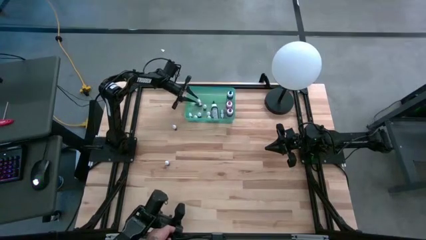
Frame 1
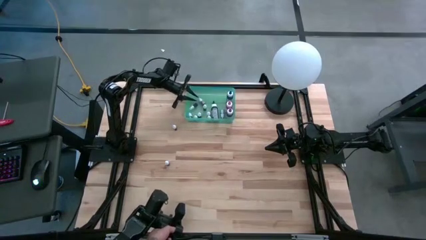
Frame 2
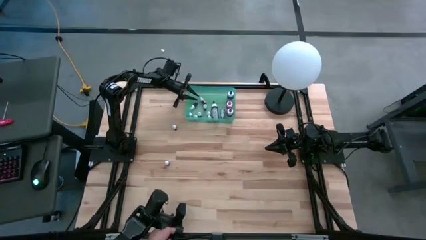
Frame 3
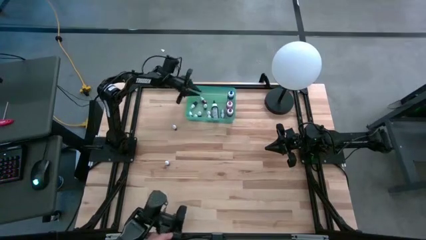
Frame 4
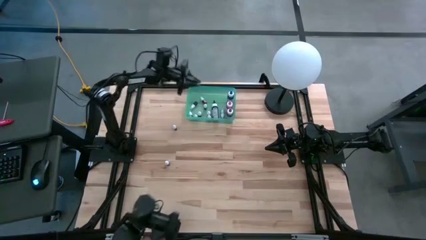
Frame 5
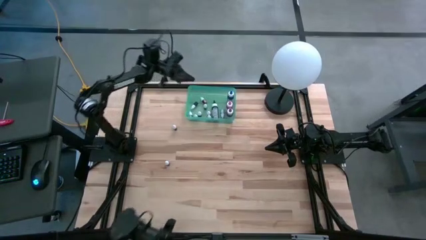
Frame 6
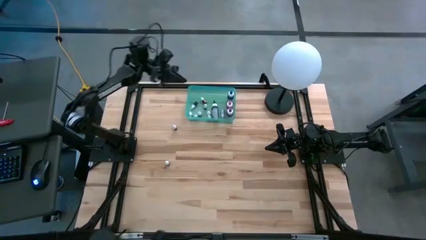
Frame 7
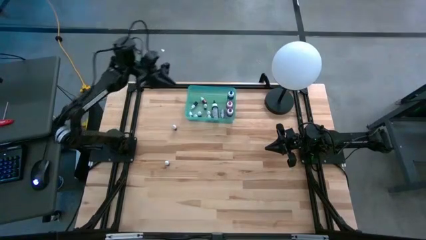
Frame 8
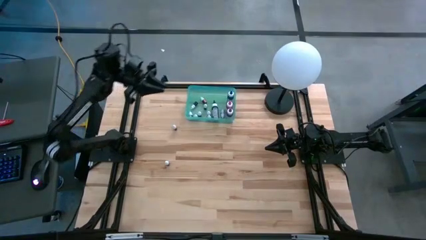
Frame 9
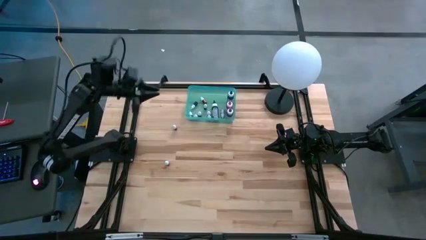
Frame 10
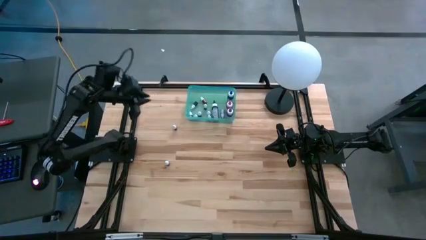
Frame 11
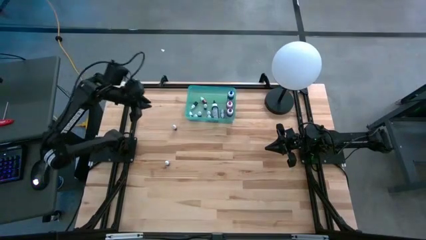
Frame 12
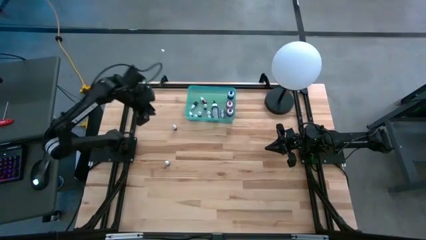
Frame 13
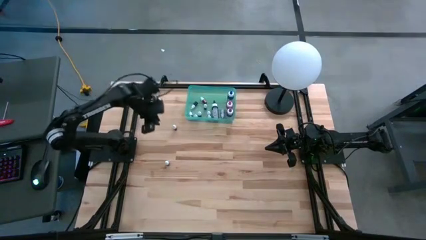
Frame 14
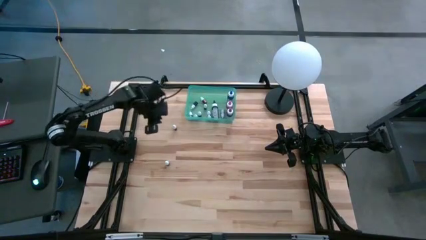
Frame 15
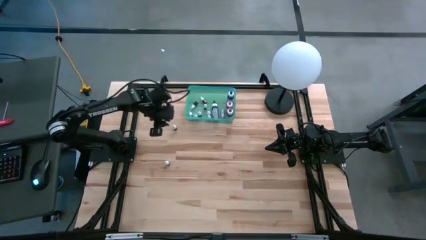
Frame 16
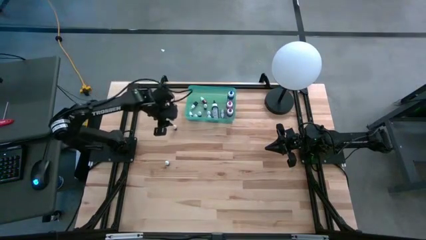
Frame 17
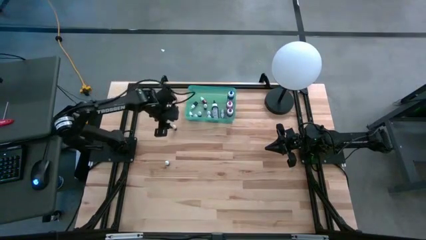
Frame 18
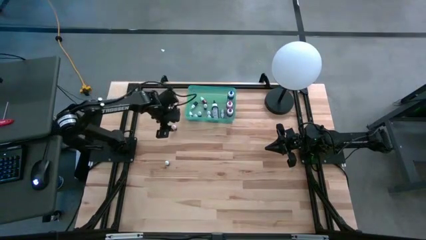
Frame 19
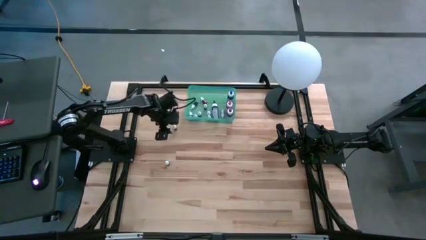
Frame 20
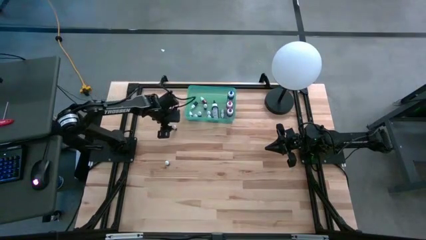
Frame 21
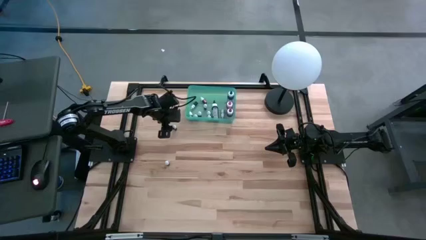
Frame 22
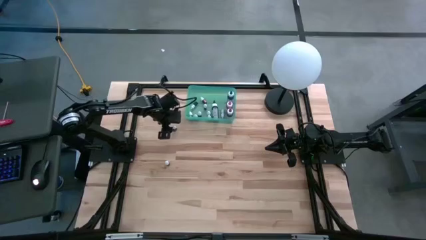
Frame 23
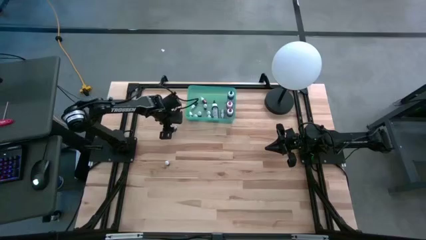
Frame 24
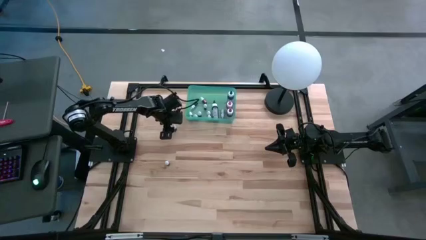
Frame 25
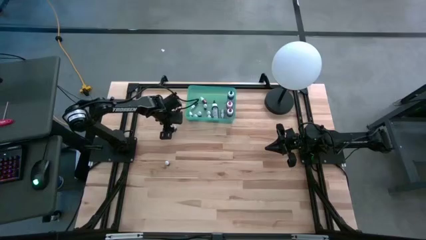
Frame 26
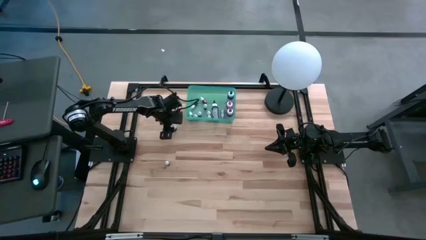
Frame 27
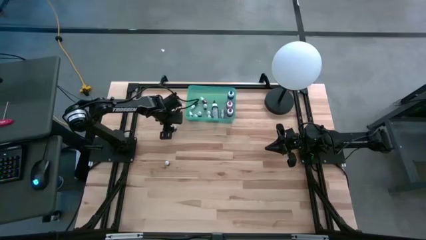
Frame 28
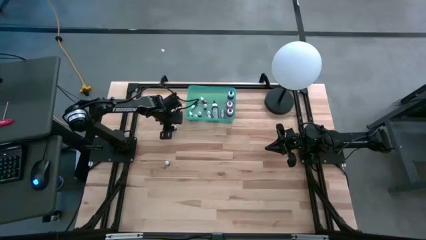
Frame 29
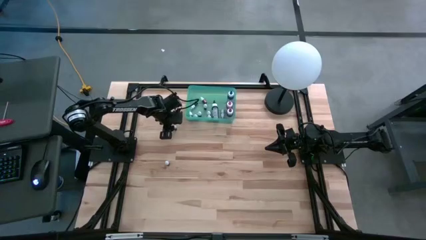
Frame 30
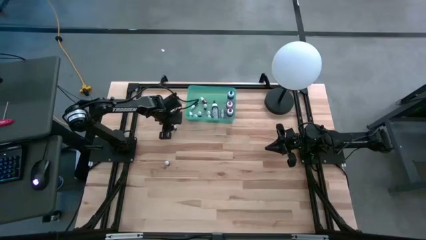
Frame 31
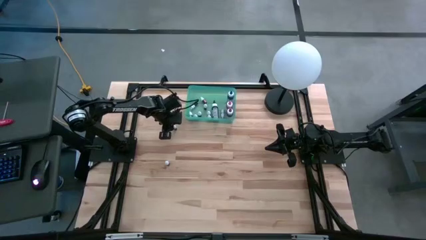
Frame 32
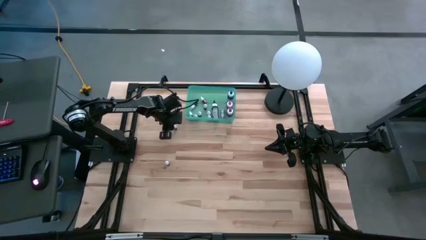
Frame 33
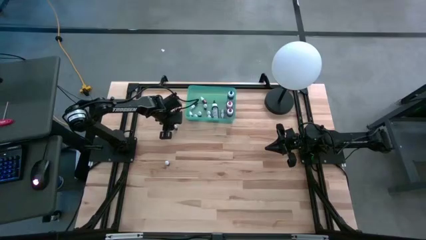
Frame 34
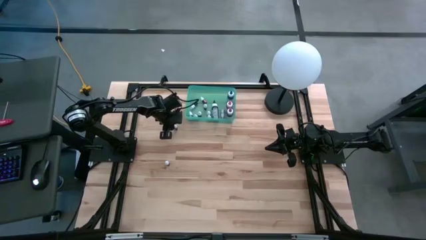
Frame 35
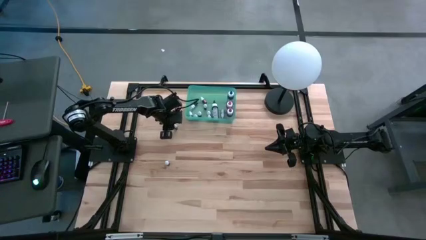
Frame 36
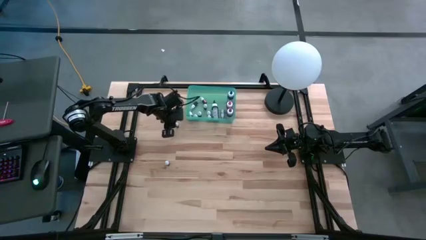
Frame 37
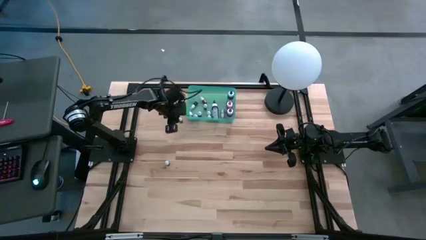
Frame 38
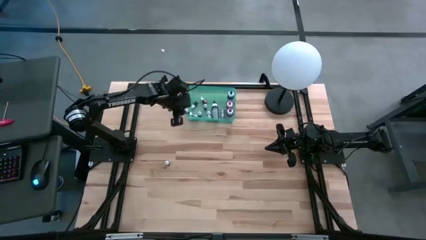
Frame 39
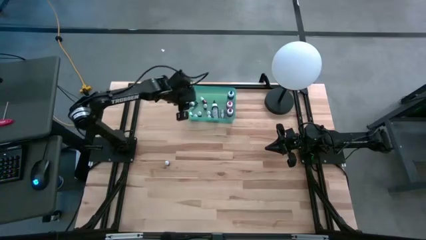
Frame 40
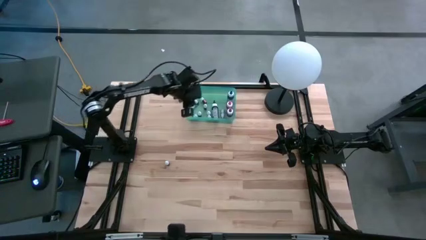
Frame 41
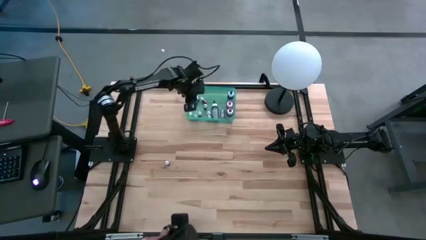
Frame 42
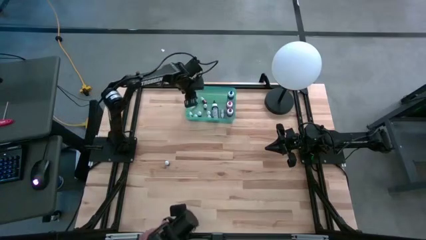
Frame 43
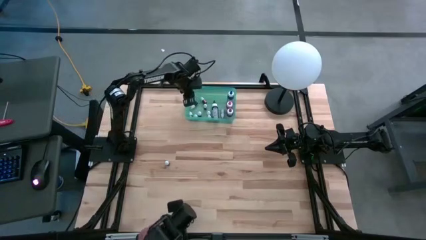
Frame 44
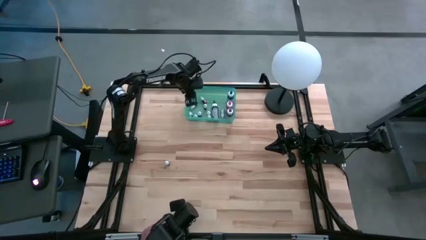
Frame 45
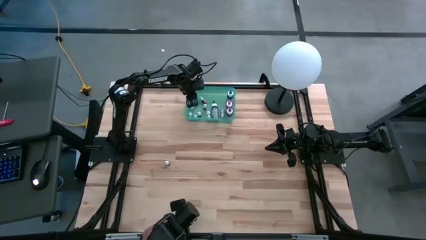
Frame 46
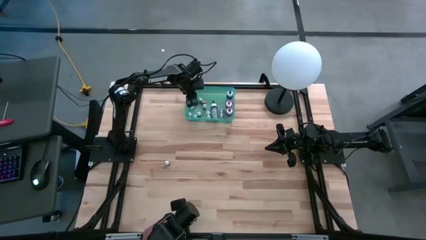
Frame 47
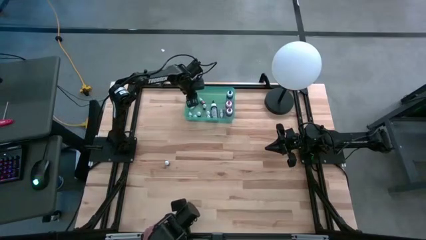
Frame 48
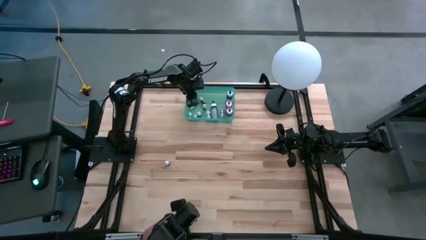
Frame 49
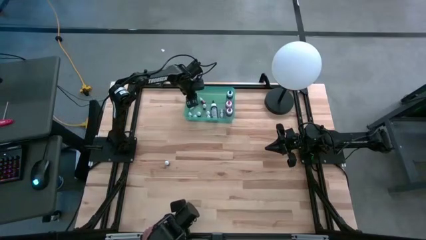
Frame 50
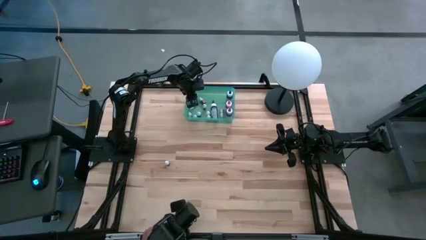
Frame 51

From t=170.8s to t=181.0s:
Task: Pick & Place food coloring
Put the small green food coloring into the bin
